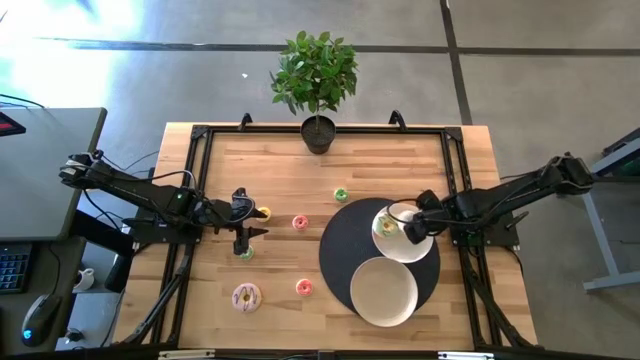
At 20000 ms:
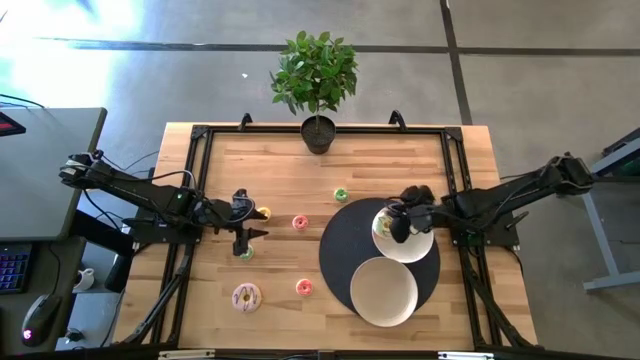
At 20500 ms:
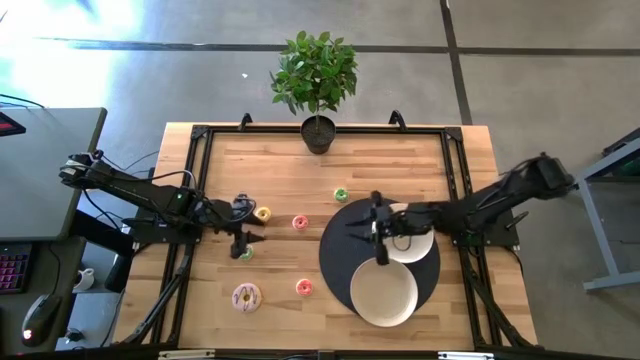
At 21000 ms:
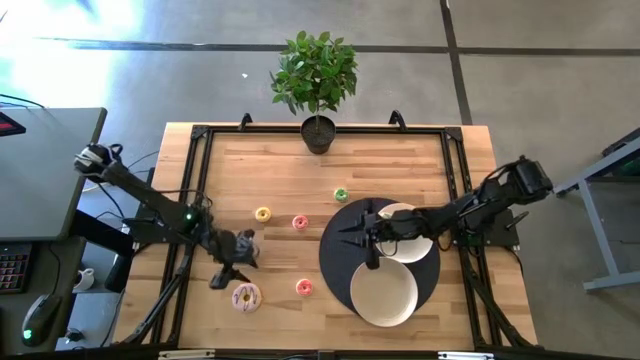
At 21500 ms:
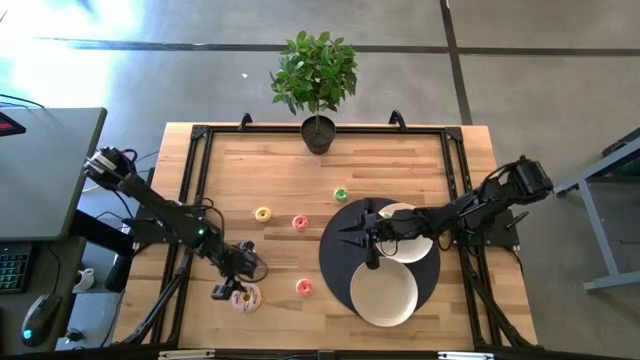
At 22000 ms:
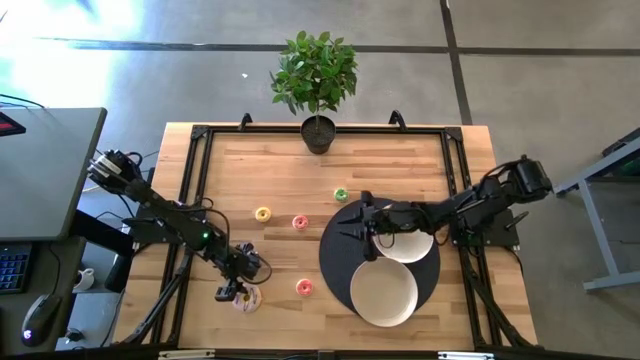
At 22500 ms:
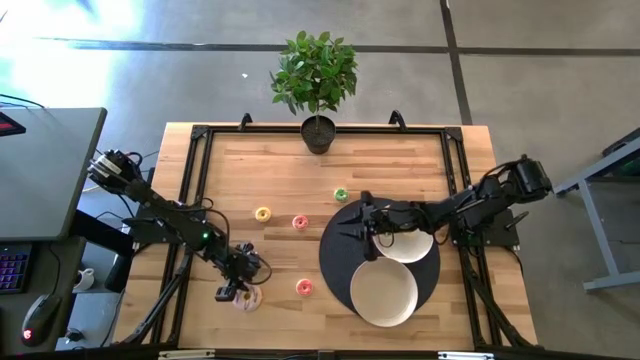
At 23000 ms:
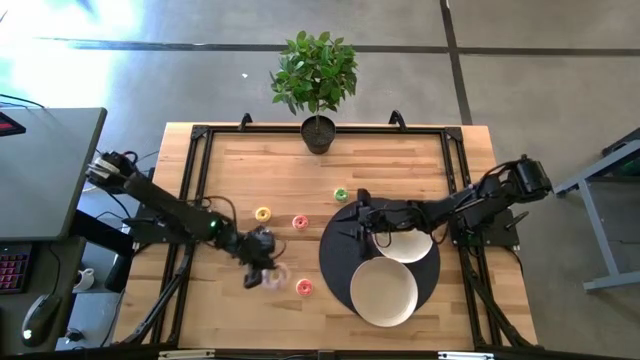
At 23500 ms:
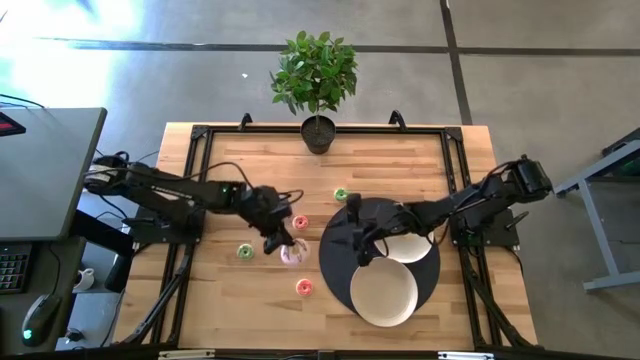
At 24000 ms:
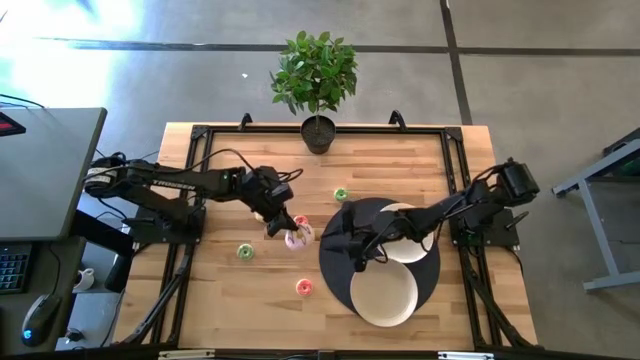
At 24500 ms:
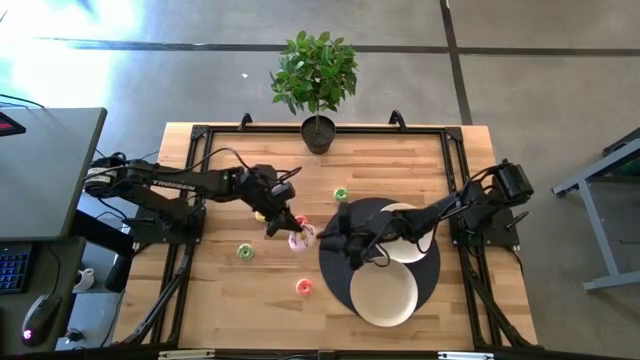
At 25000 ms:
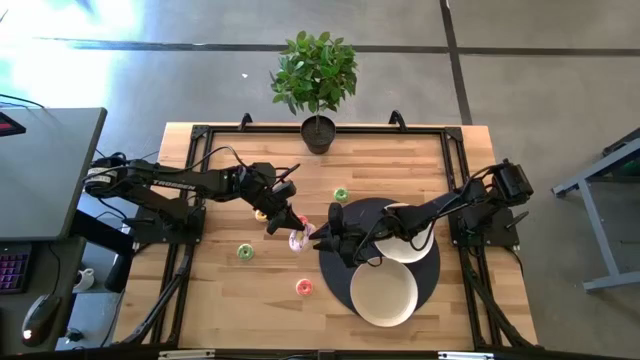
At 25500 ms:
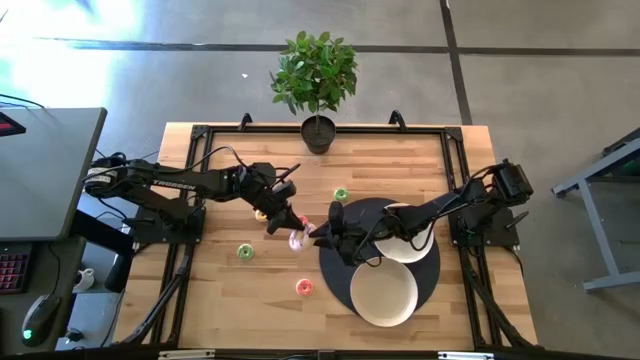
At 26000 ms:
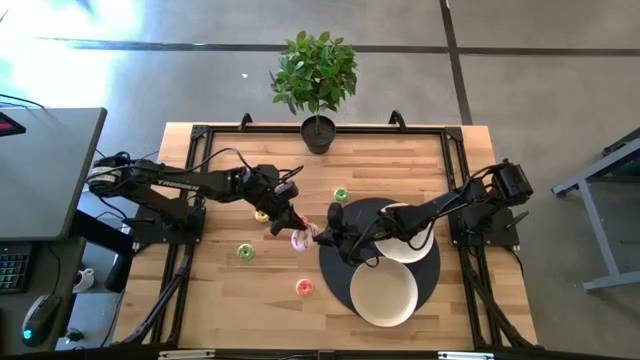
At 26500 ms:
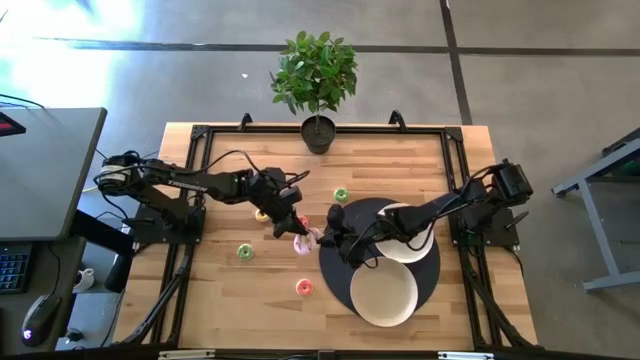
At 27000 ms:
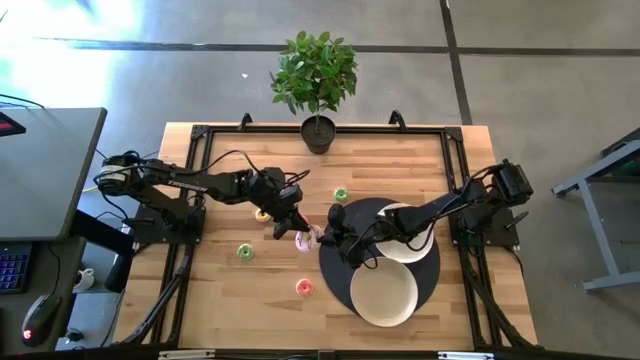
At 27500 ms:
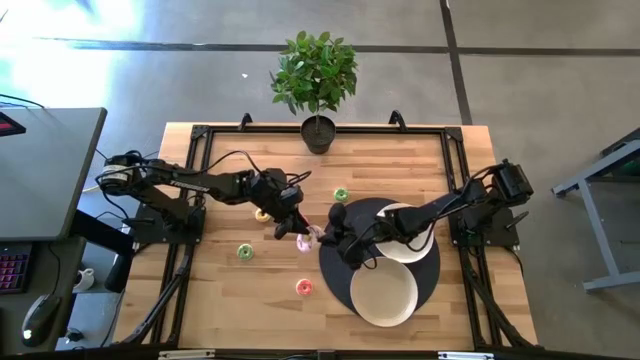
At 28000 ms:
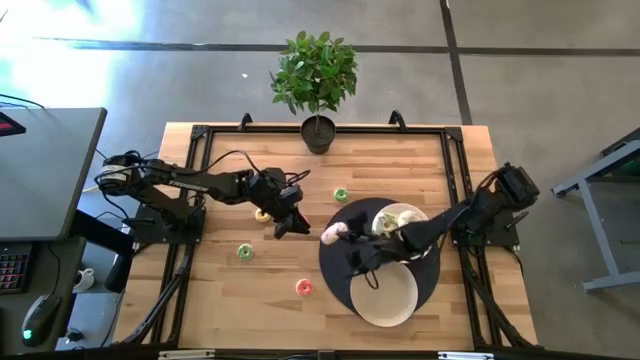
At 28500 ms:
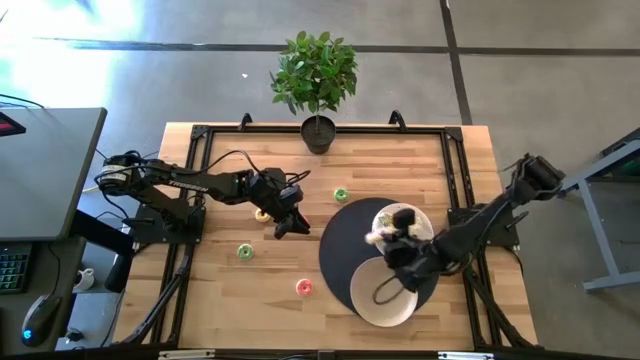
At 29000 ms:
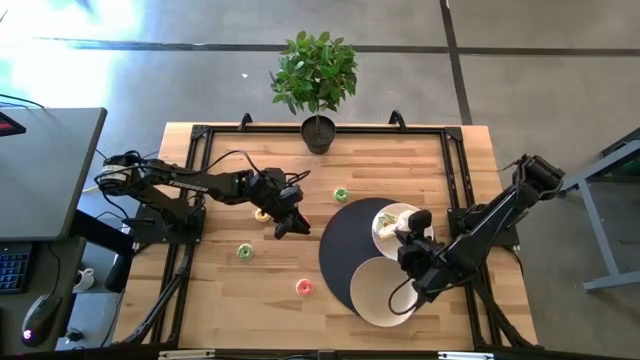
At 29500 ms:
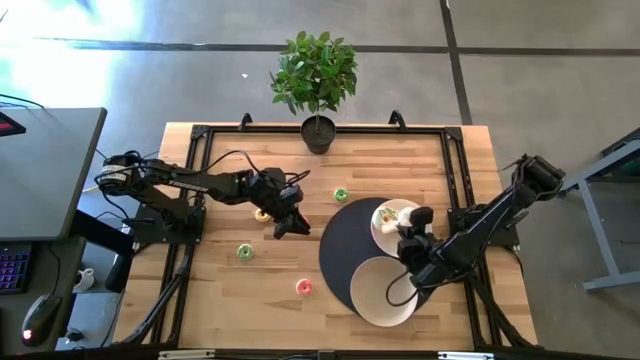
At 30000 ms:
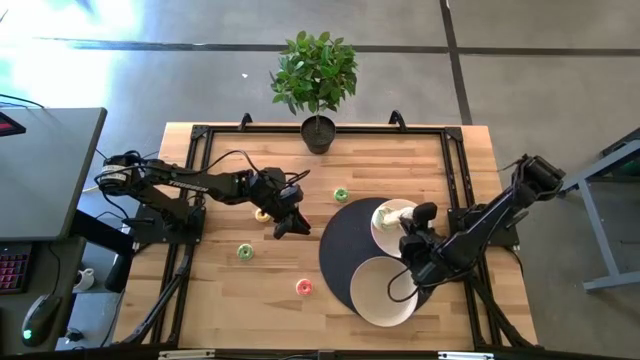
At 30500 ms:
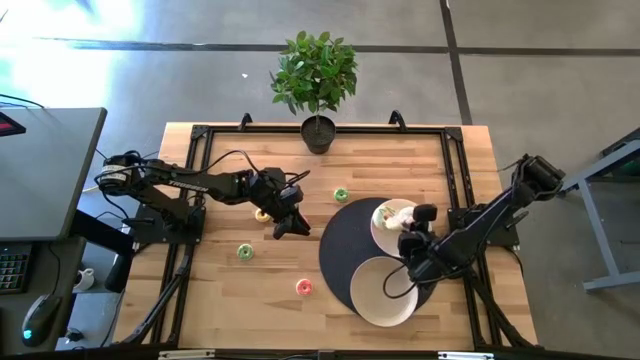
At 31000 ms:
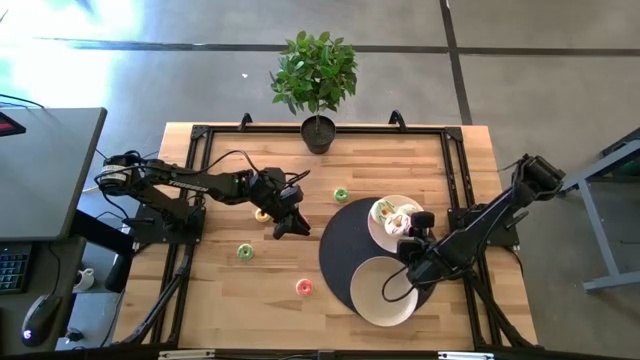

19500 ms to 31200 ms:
Task: Pick & Place donuts
Put the big purple donut on the top white plate

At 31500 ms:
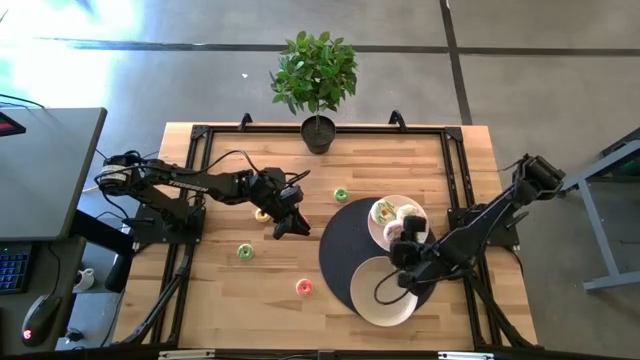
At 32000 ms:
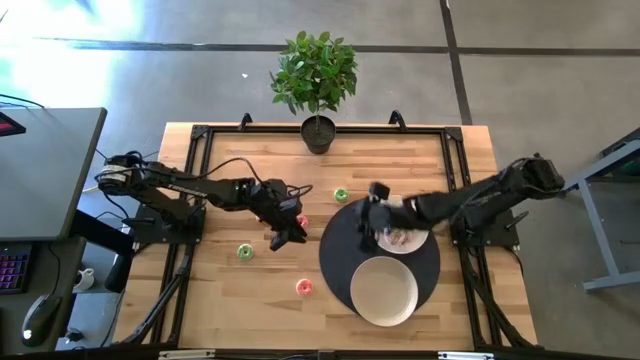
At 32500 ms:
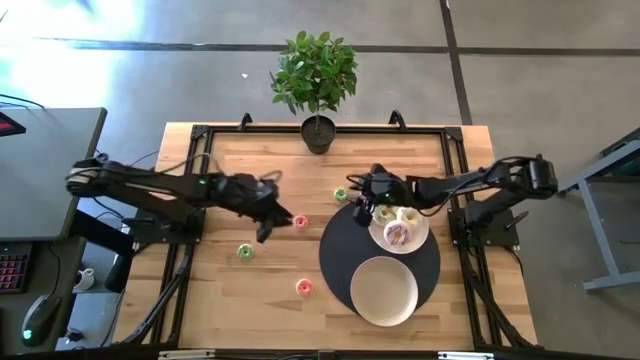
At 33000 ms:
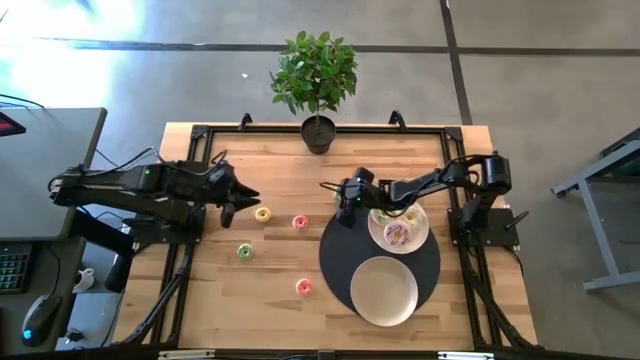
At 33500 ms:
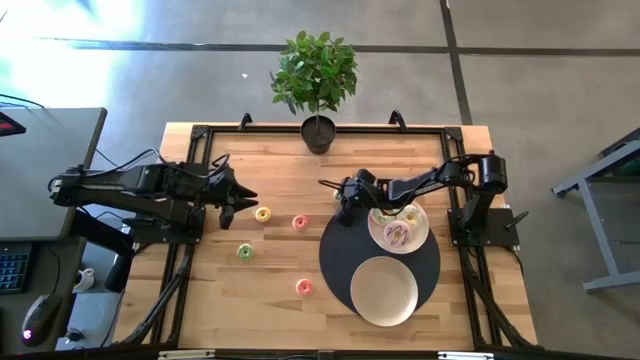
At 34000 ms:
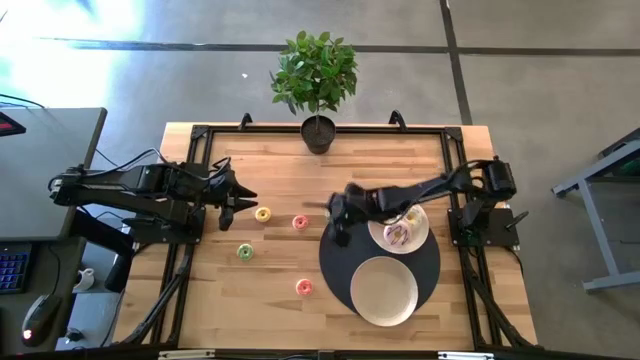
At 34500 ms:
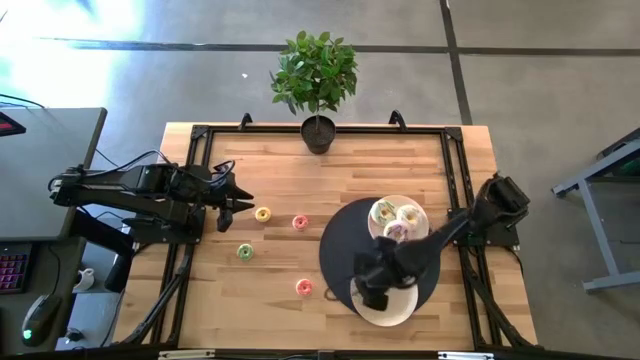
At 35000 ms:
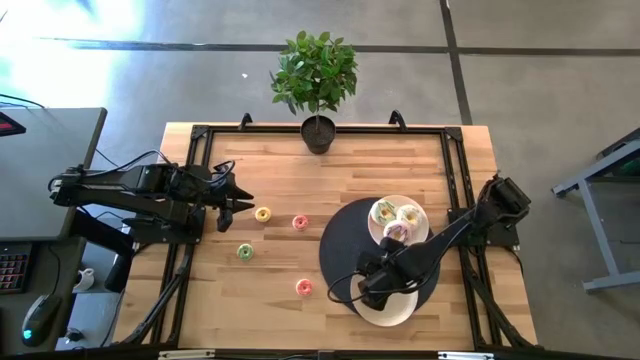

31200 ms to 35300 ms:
Put the small top green donut on the bottom white plate

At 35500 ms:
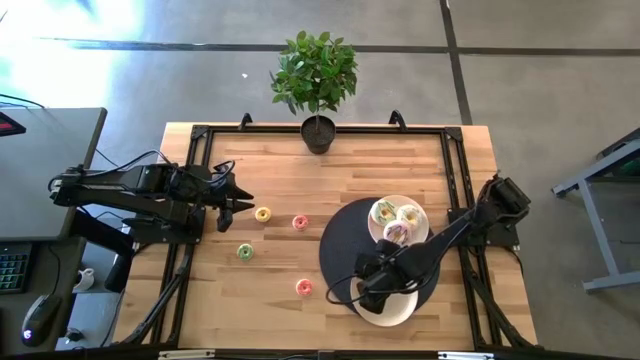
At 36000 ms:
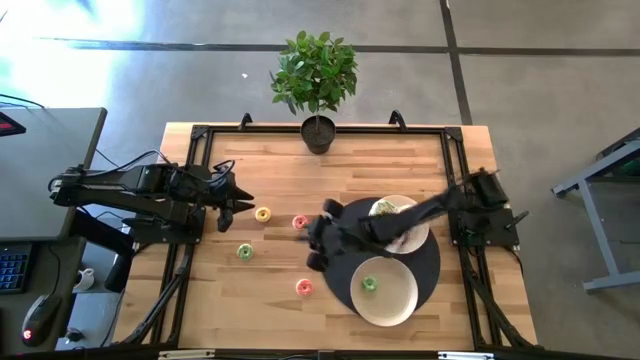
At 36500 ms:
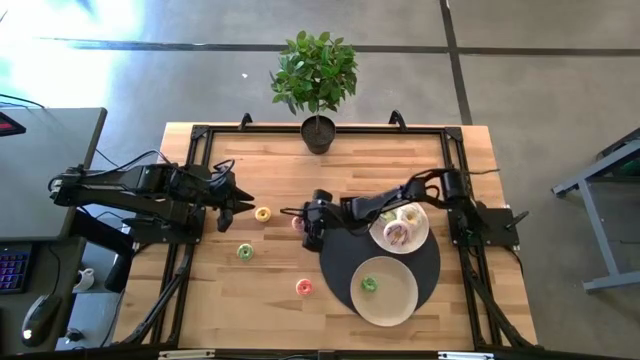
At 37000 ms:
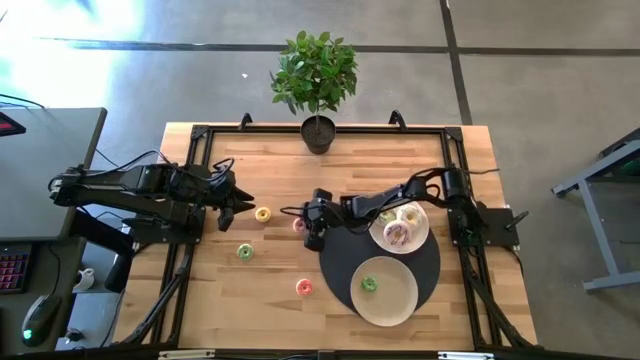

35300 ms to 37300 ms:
Put the small top pink donut on the bottom white plate

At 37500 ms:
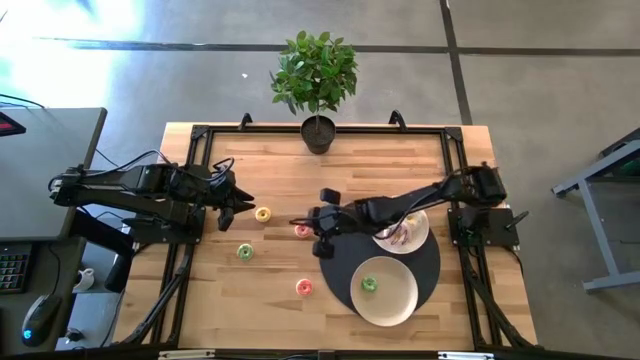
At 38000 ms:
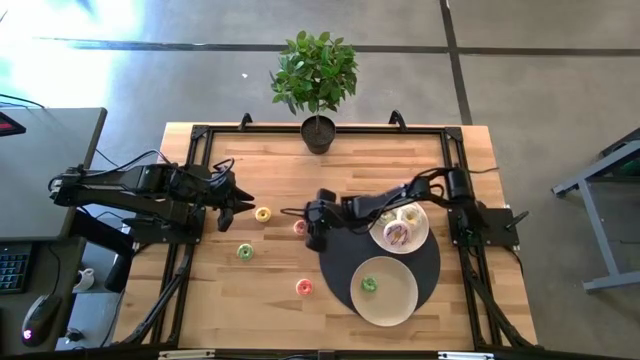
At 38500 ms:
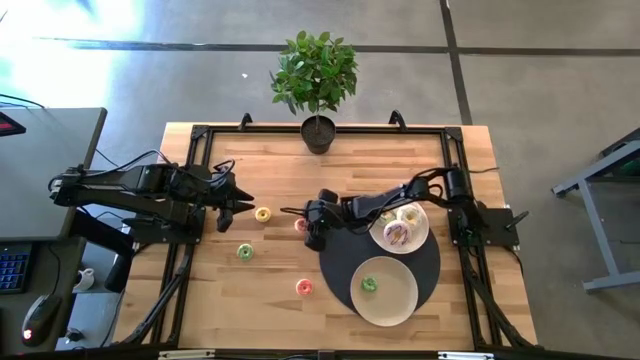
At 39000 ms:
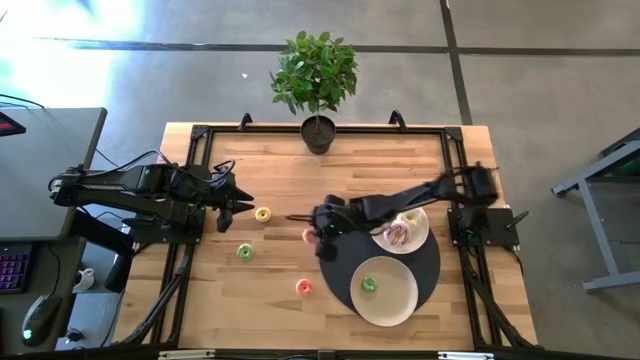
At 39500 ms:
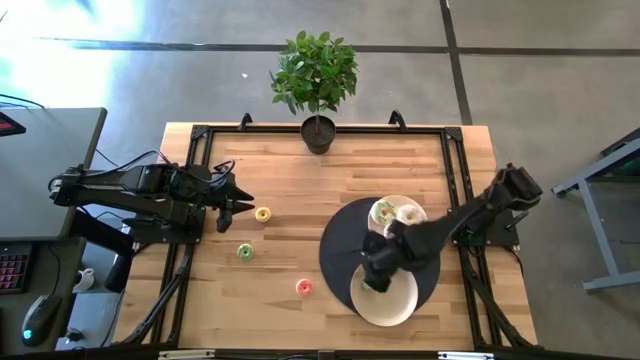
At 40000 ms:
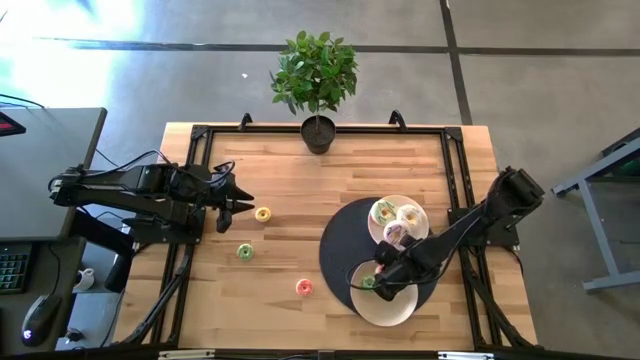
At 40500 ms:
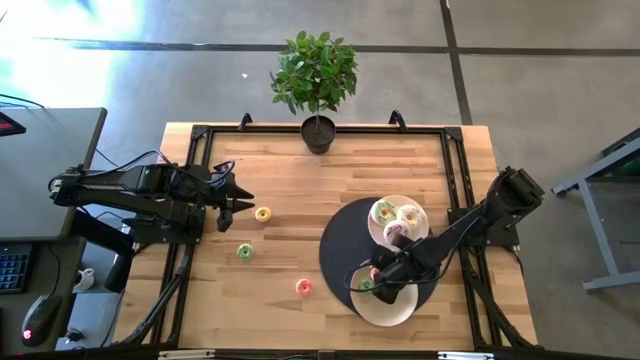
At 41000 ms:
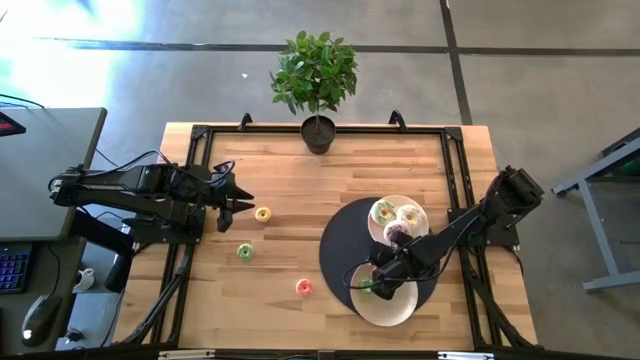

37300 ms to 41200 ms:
Put the small top pink donut on the bottom white plate
